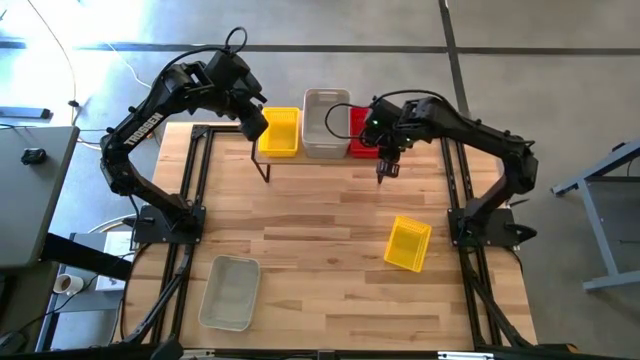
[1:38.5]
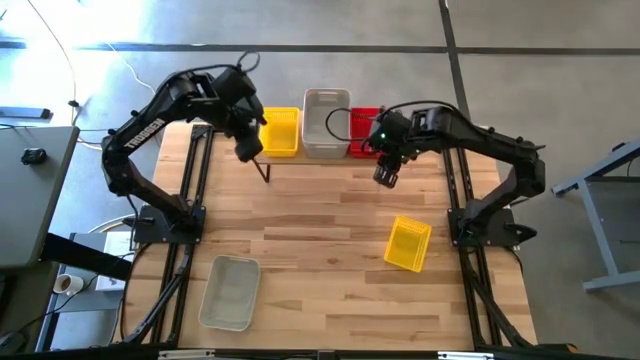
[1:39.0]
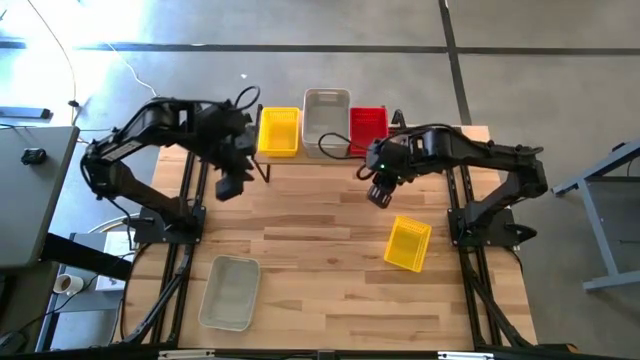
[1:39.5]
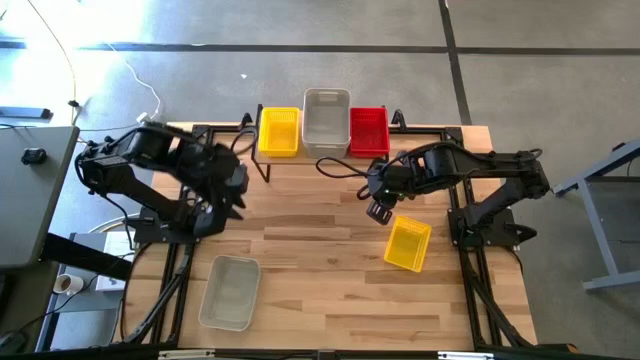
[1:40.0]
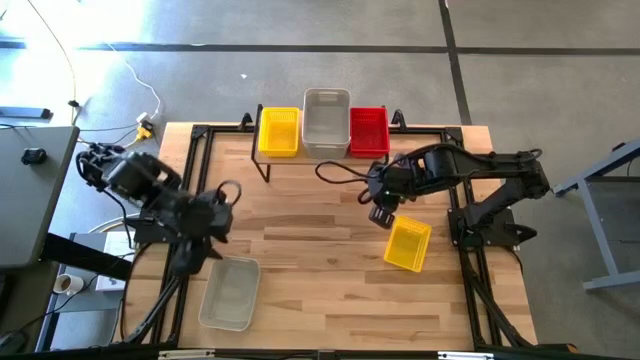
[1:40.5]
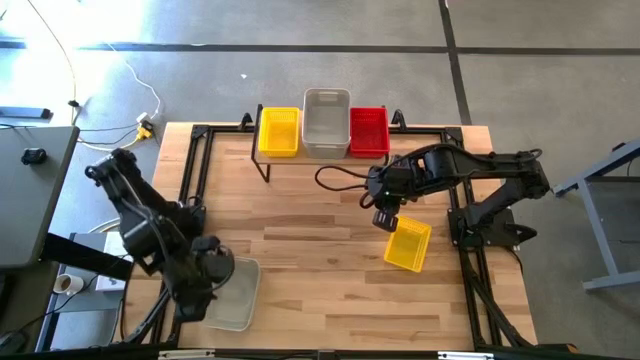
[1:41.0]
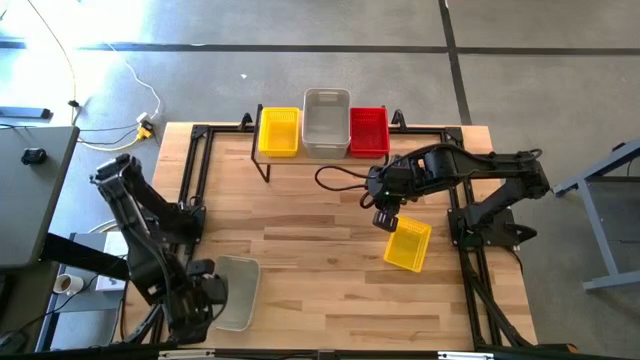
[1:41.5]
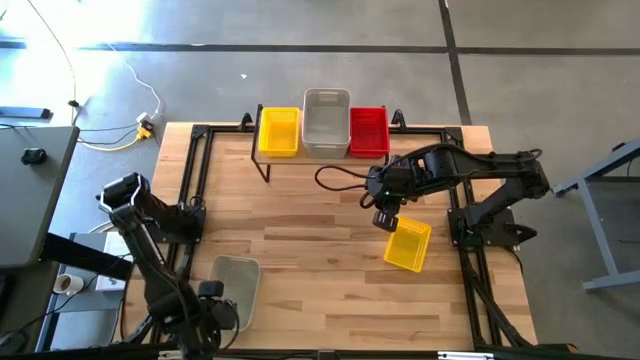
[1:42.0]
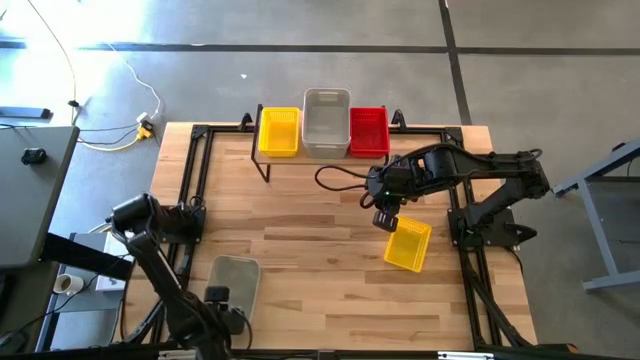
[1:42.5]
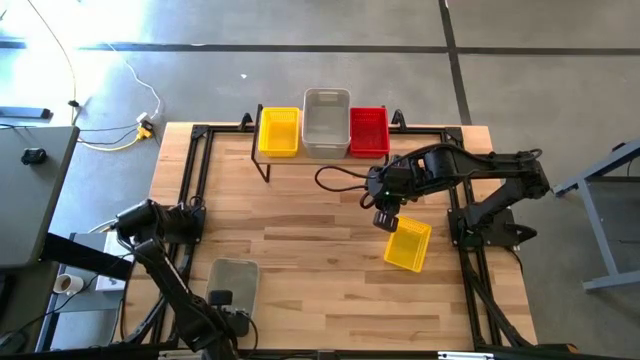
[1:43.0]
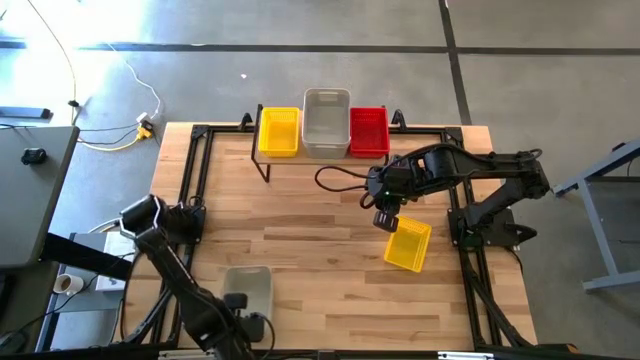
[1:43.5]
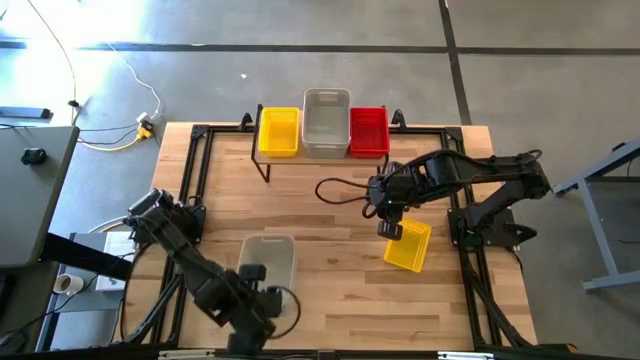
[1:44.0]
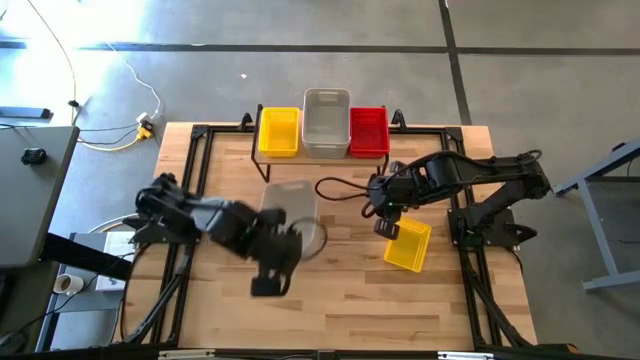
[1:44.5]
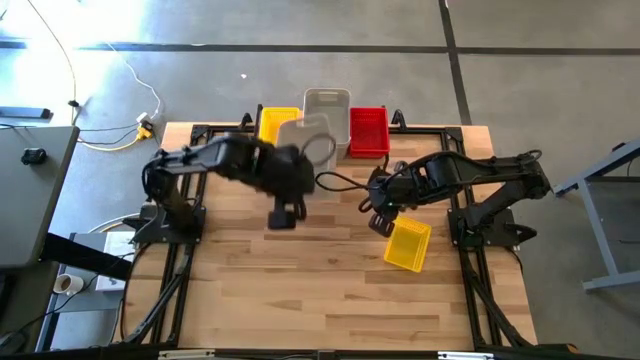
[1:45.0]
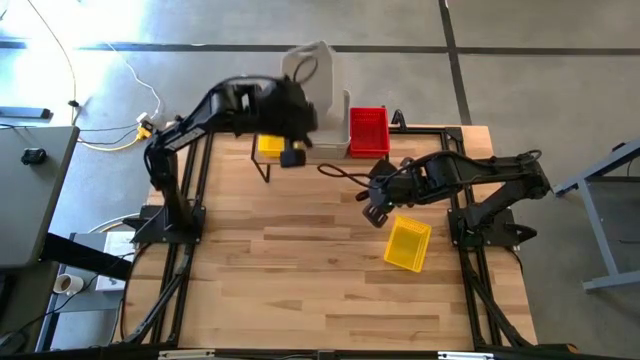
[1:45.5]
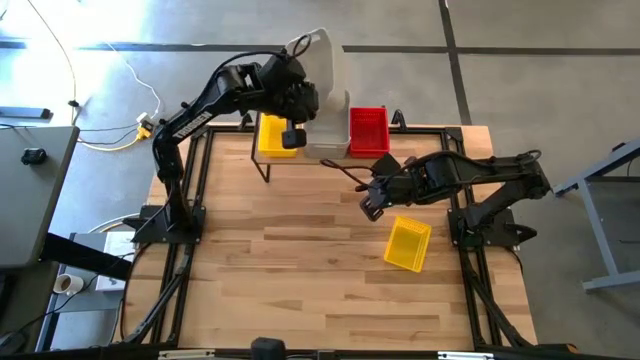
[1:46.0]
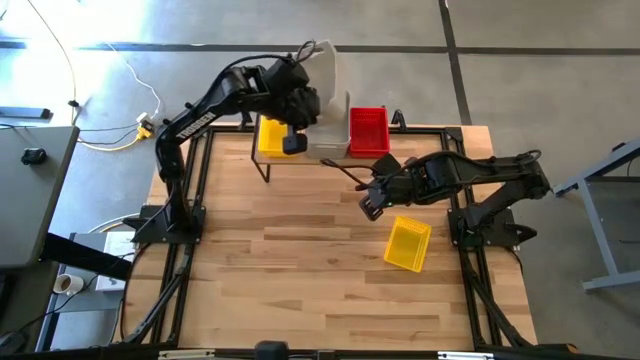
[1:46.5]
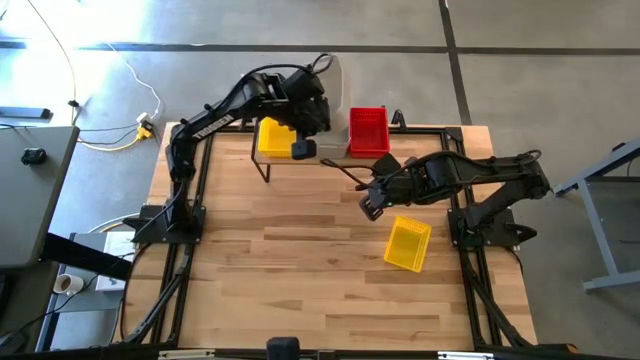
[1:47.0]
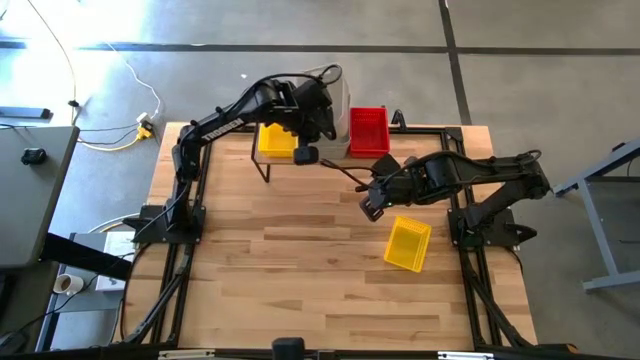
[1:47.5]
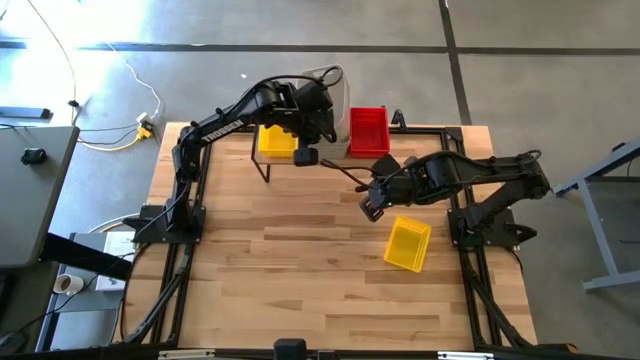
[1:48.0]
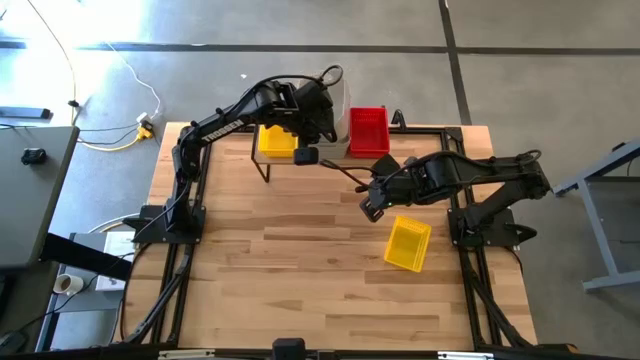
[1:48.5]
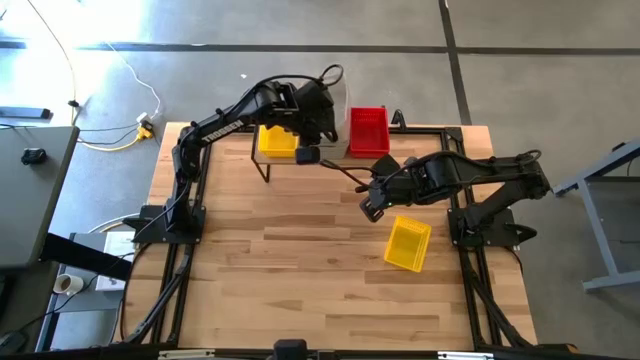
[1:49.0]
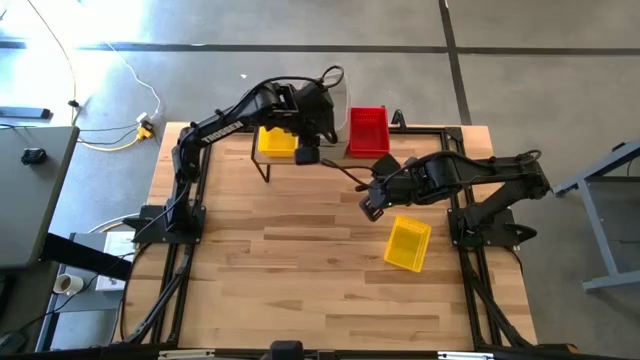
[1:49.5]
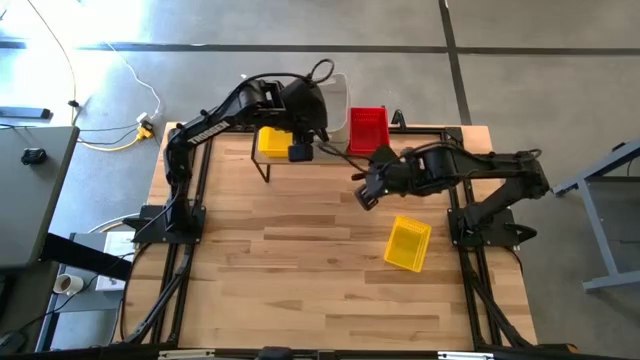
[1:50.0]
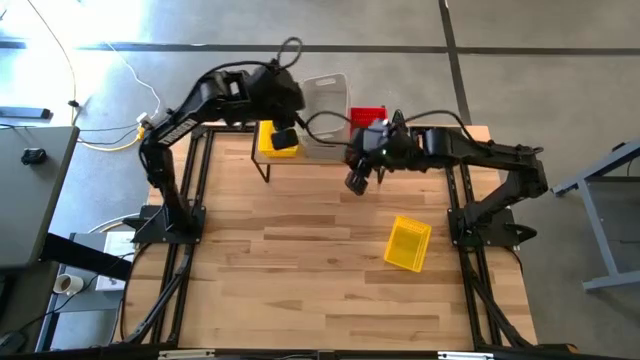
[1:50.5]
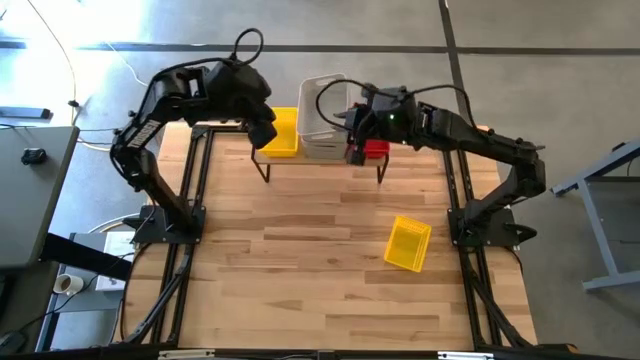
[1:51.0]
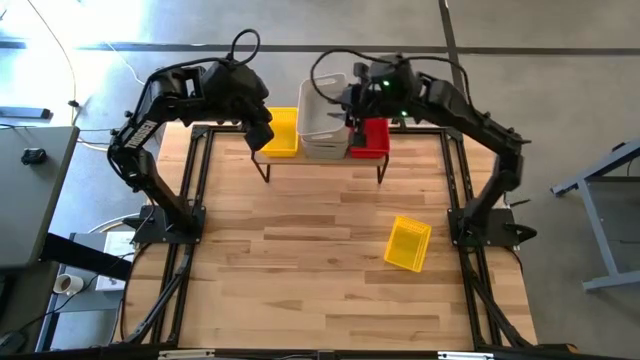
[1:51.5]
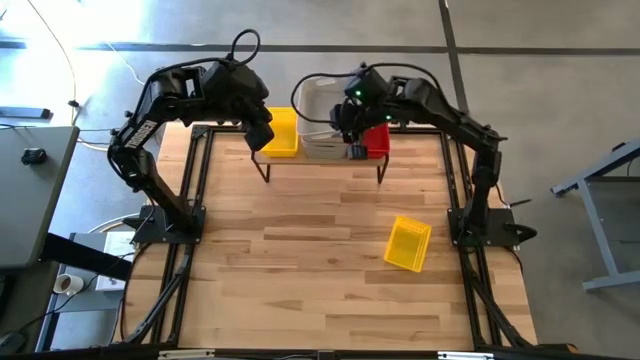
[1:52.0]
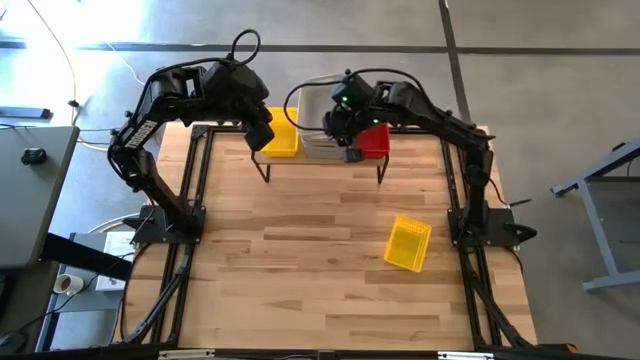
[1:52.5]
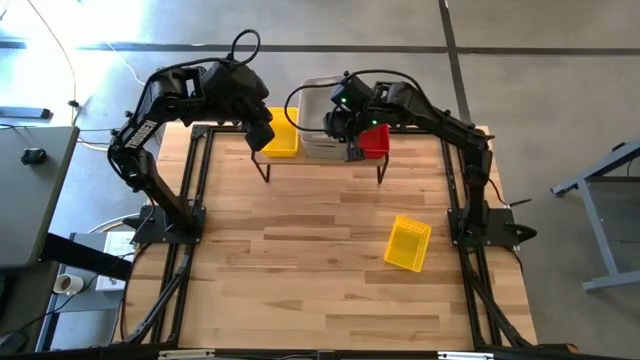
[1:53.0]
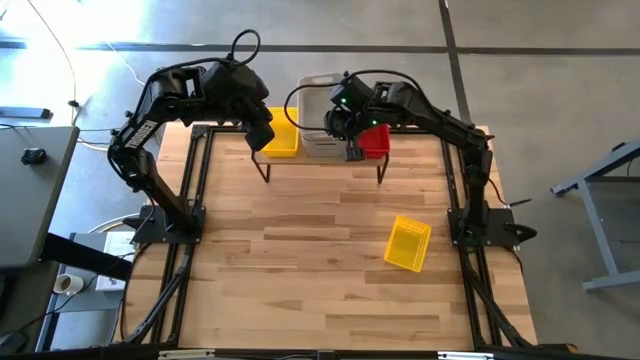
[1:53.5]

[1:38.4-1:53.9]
Task: Stack baskets on shelf by color
Stack the gray bin on top of the gray bins on the shelf

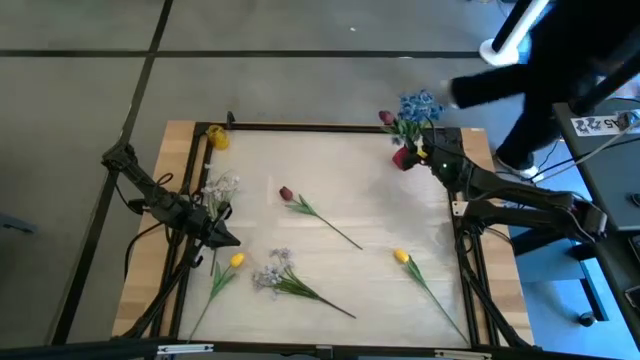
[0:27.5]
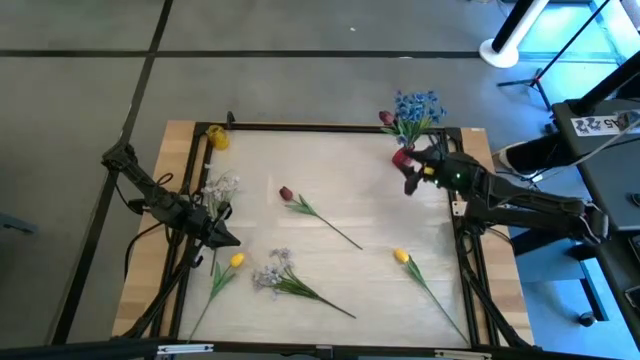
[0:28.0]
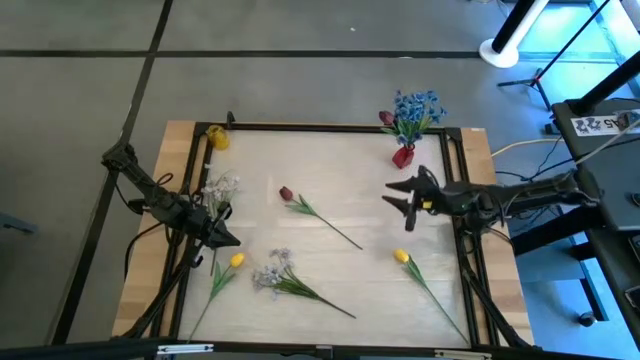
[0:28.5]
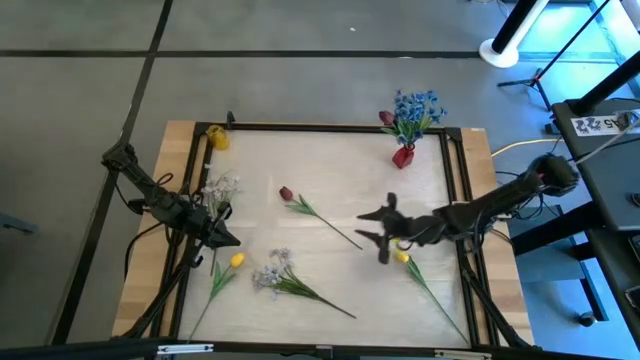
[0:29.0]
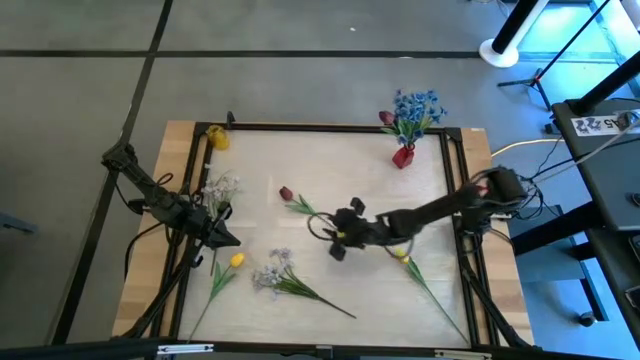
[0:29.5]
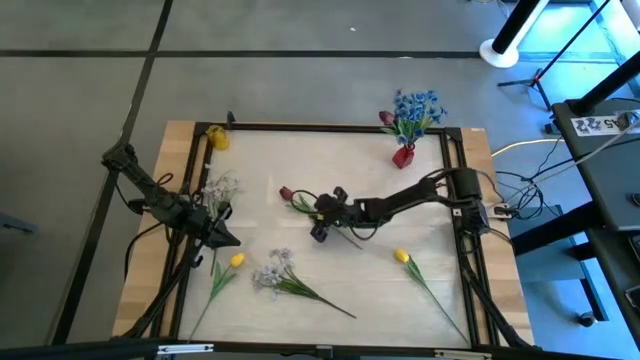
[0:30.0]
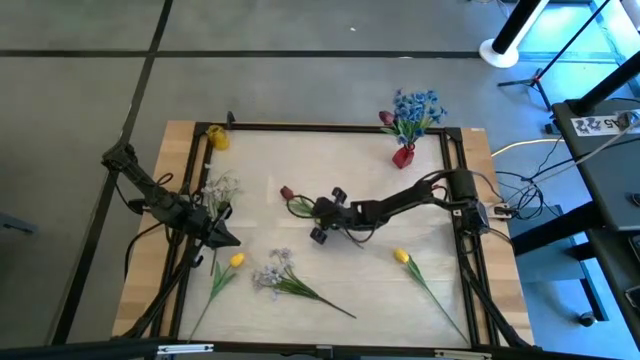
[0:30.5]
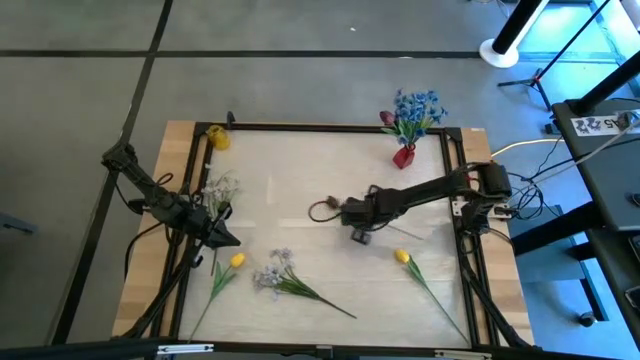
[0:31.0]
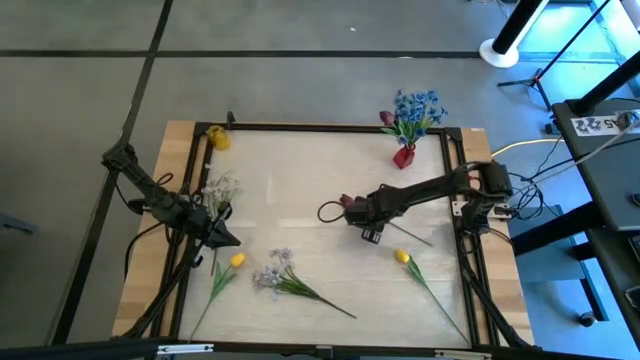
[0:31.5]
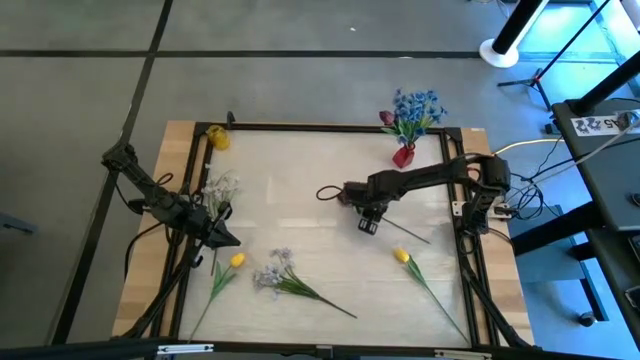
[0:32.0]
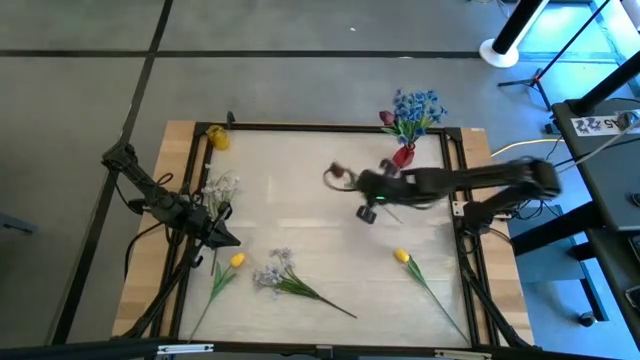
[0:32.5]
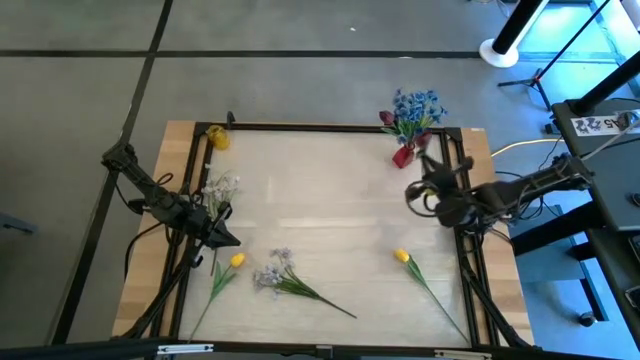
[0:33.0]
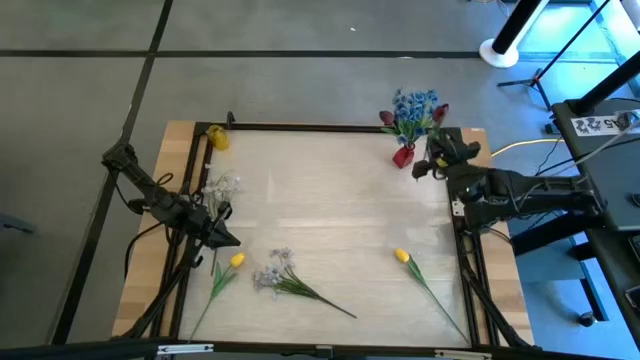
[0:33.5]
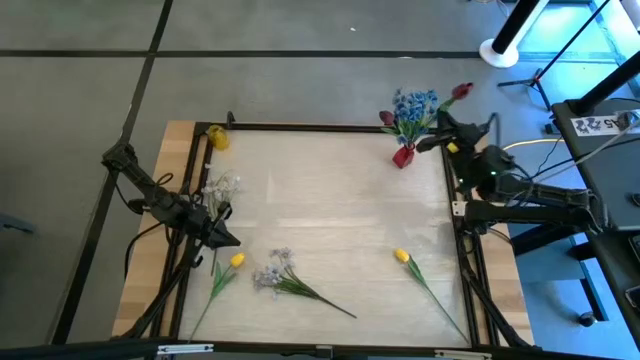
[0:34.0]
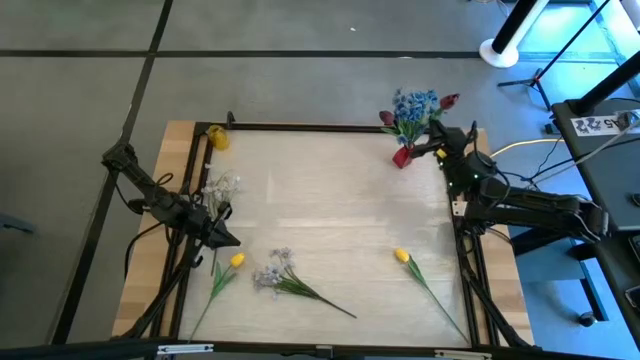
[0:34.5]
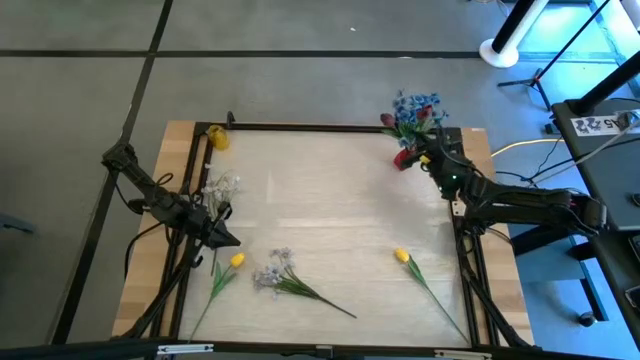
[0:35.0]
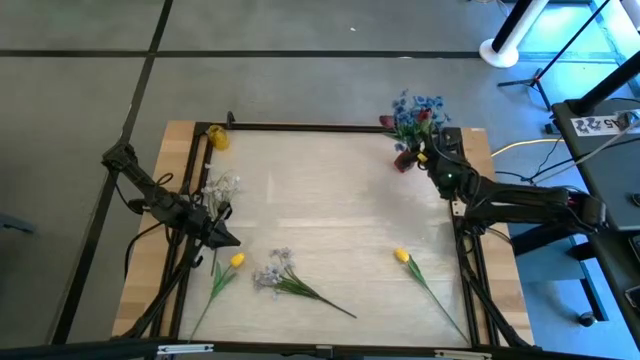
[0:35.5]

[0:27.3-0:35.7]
Task: Sort flowers into vase by color
Put the red flower into the red vase
